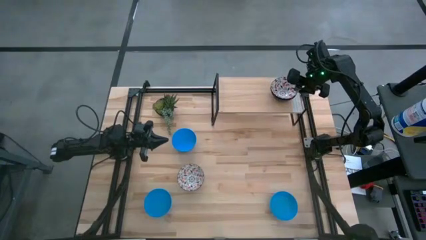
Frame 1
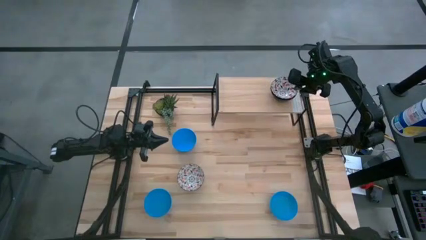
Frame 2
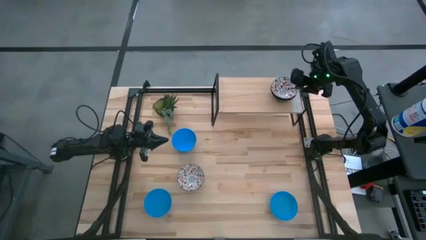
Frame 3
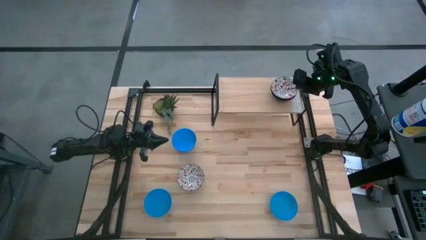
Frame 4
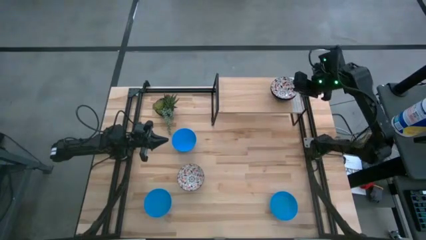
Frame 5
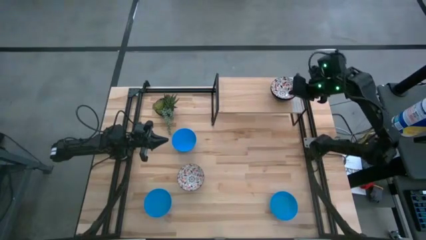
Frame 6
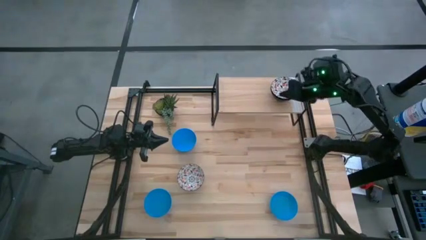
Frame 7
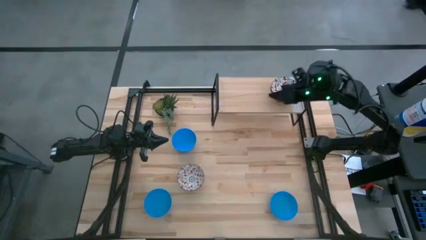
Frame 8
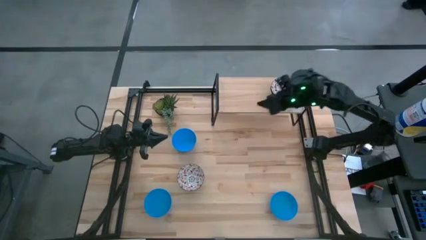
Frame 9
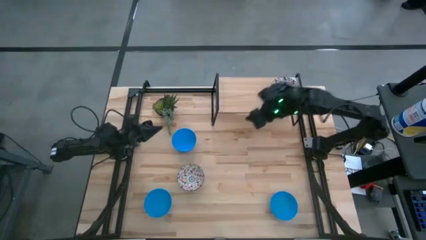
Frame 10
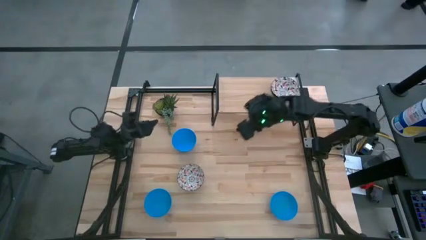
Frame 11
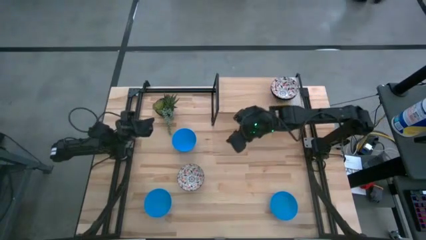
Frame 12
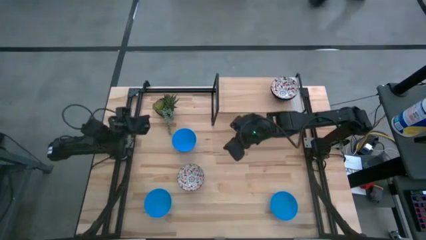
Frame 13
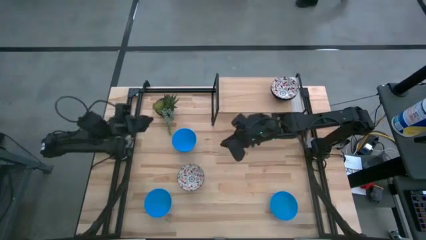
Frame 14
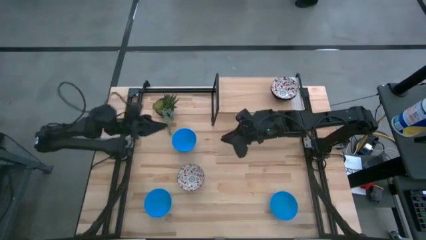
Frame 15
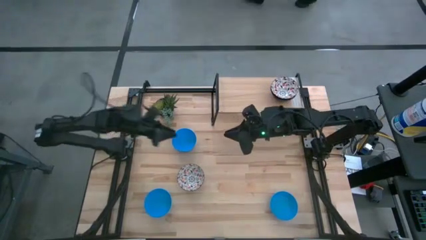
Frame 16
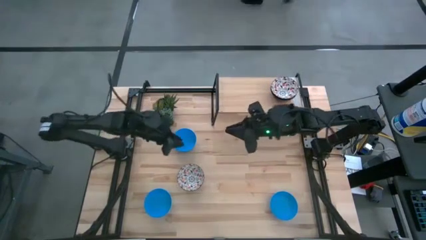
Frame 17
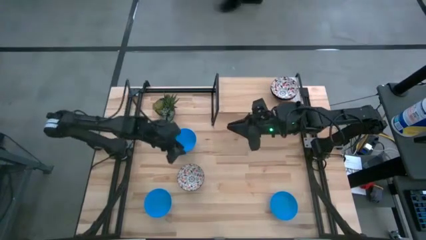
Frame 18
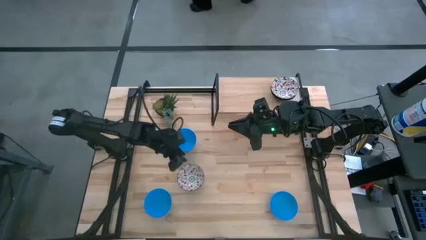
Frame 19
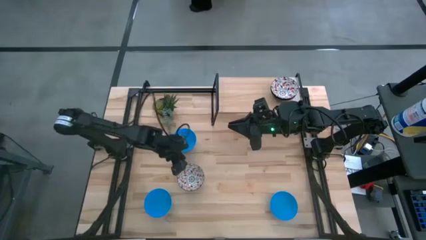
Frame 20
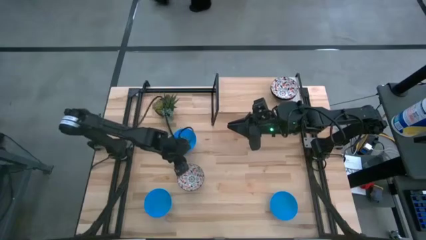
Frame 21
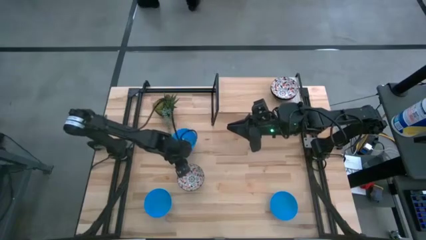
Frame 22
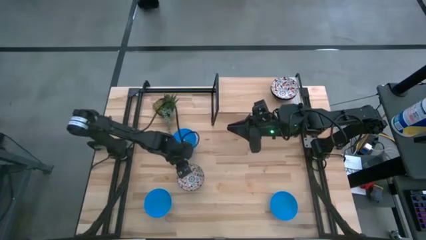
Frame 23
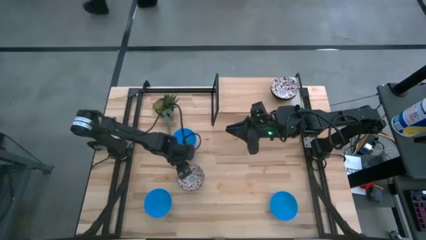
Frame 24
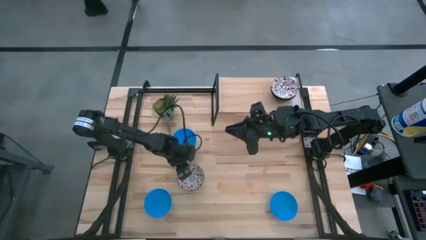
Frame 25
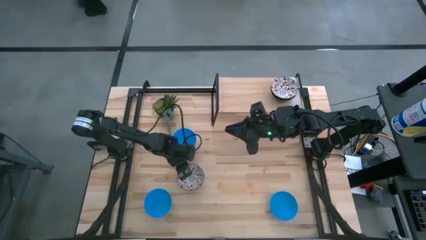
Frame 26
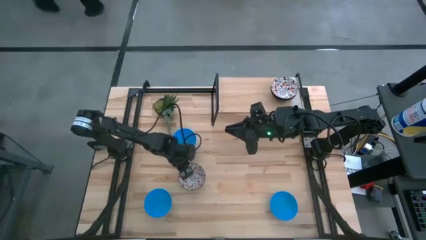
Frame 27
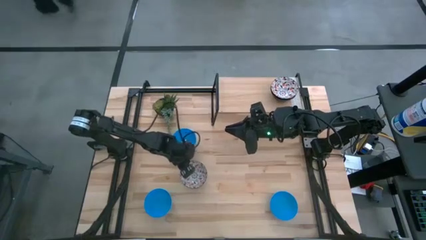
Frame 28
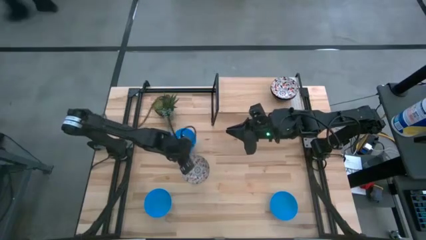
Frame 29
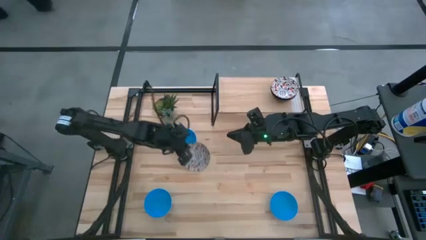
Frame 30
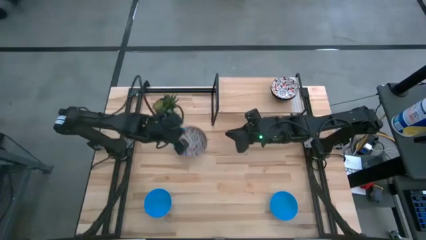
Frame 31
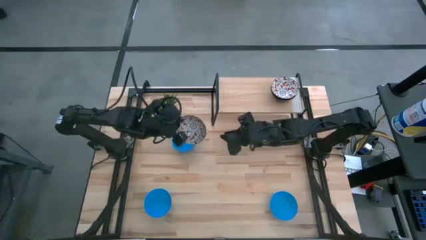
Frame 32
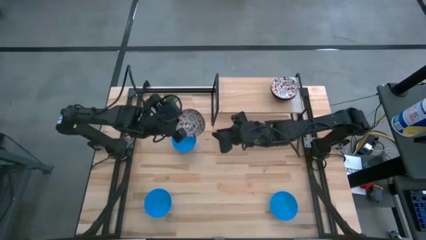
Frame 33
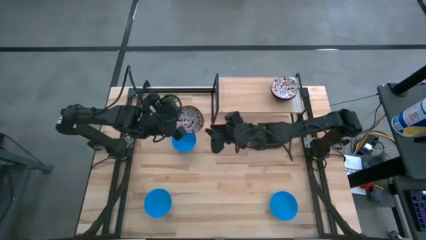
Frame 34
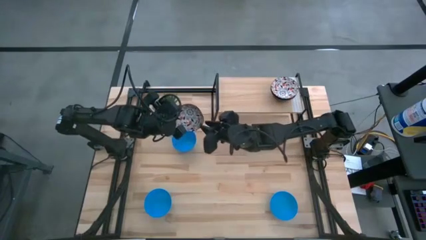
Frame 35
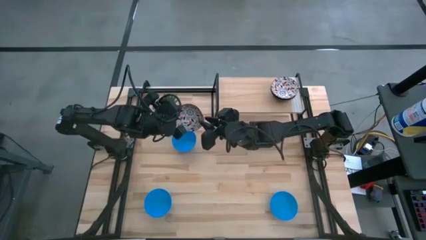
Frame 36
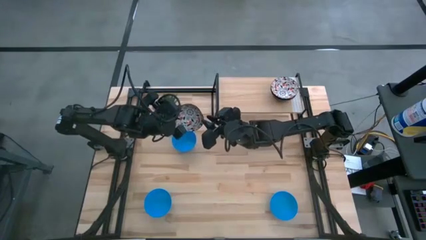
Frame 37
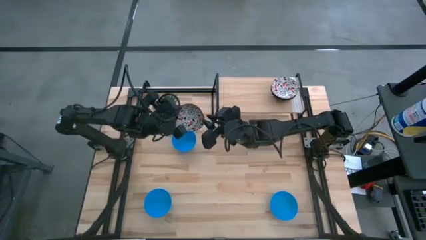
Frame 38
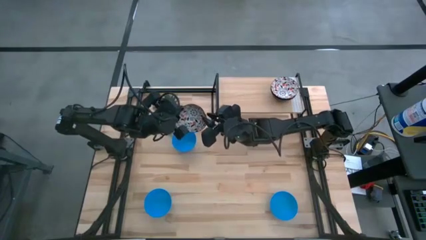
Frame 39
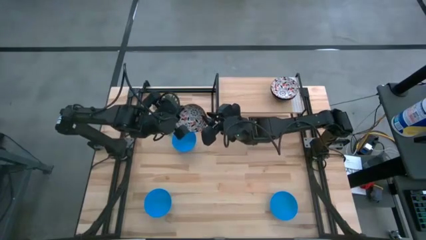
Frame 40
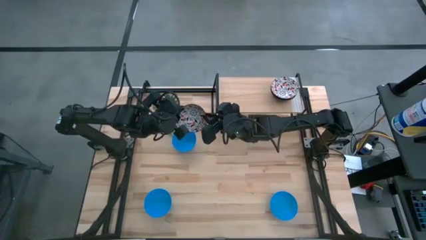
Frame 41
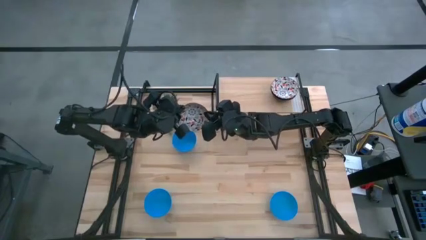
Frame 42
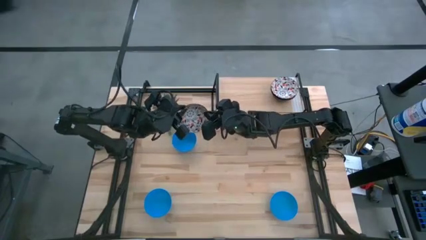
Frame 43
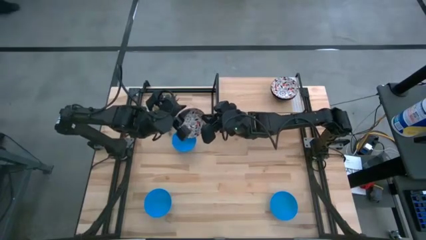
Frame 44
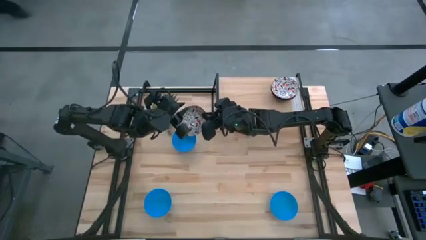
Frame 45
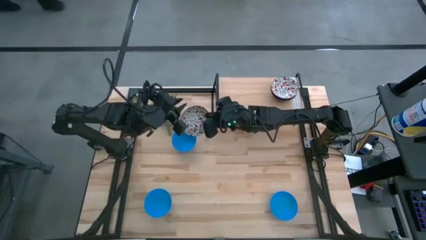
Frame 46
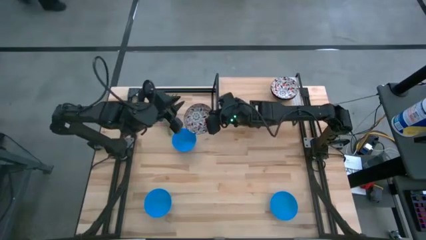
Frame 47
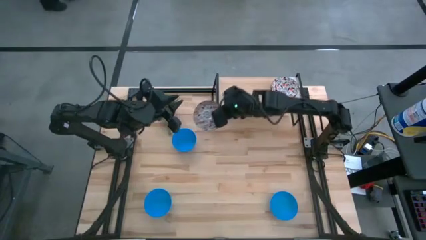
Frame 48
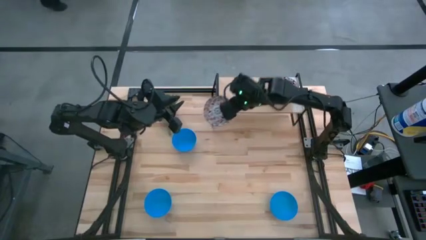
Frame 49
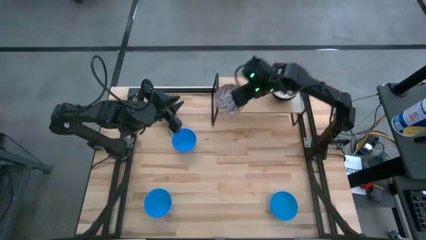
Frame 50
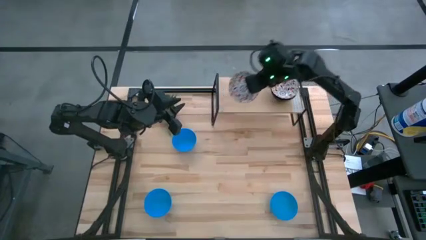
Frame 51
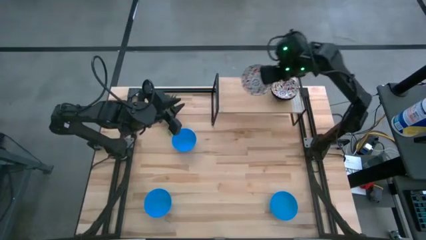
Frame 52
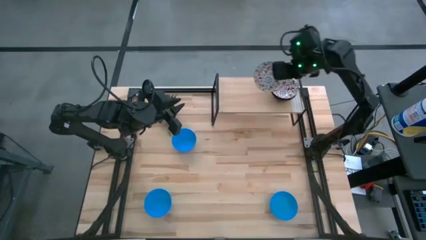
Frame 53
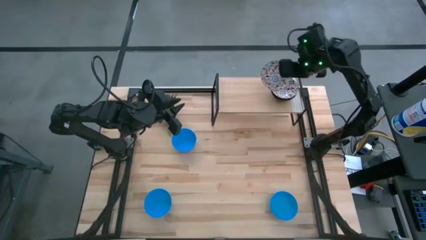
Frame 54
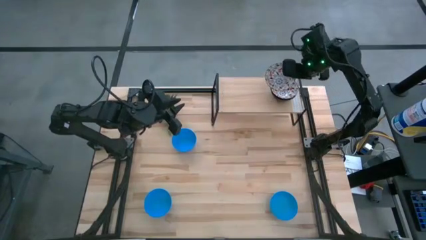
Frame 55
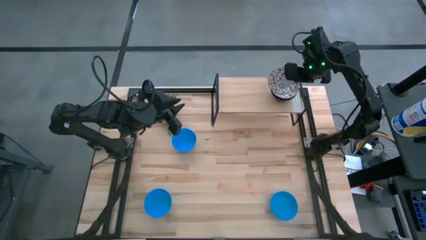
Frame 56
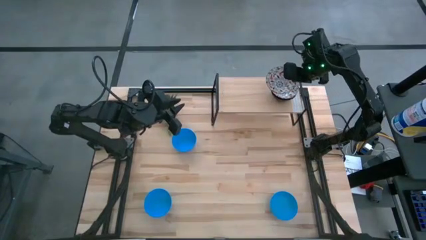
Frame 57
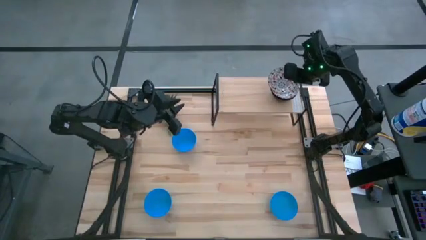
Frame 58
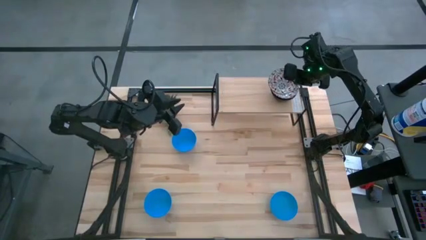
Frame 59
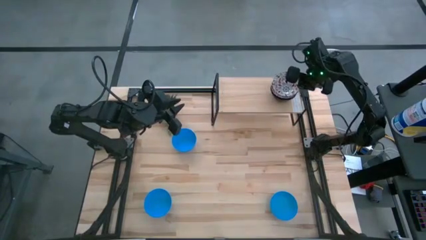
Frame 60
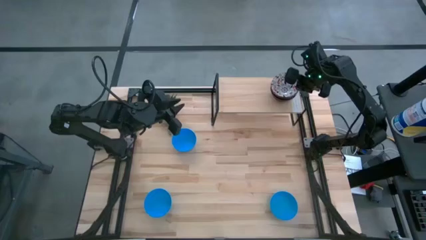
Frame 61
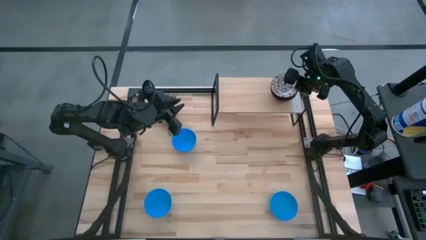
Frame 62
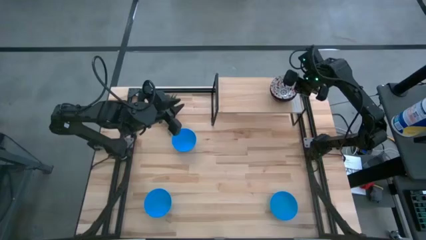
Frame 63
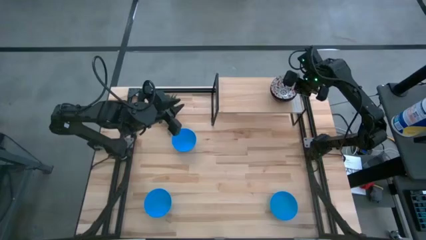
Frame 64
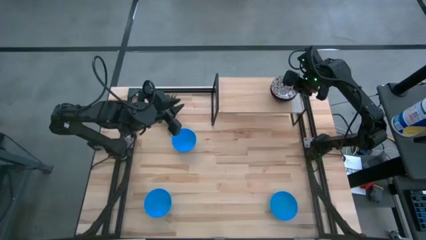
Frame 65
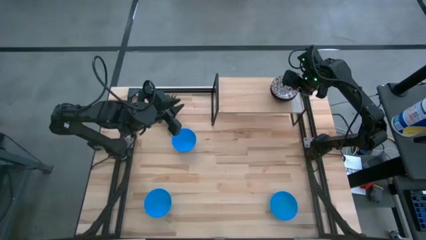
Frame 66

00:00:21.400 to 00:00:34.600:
Task: Pick & Place Mini bowls
Stack the white patterned bowl on top of the other white patterned bowl on the shelf
